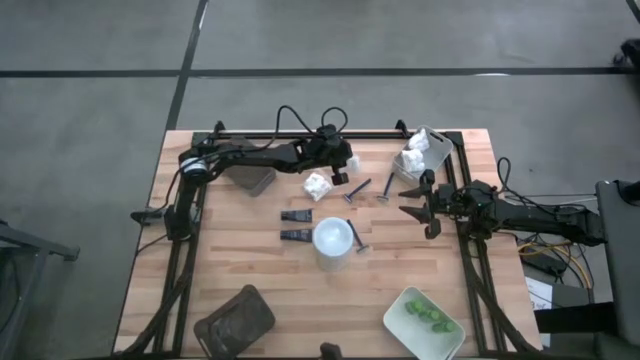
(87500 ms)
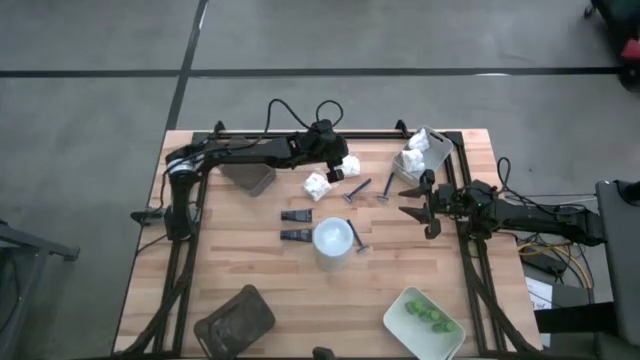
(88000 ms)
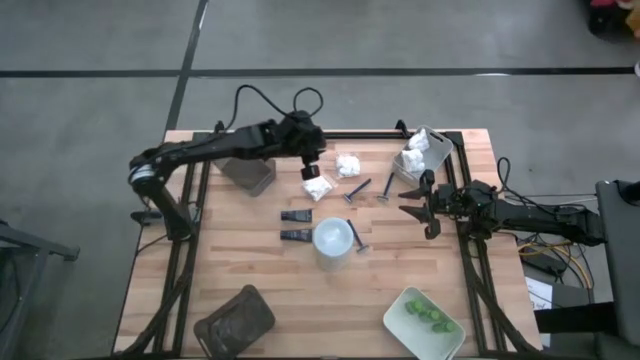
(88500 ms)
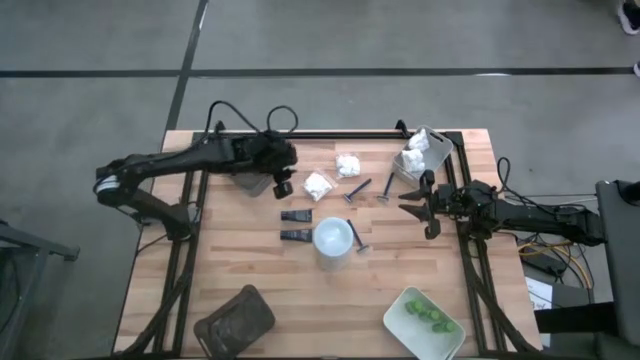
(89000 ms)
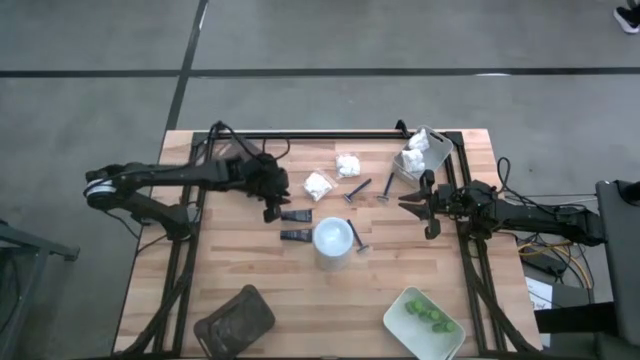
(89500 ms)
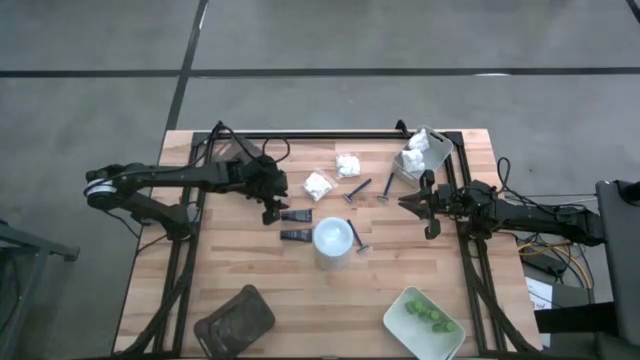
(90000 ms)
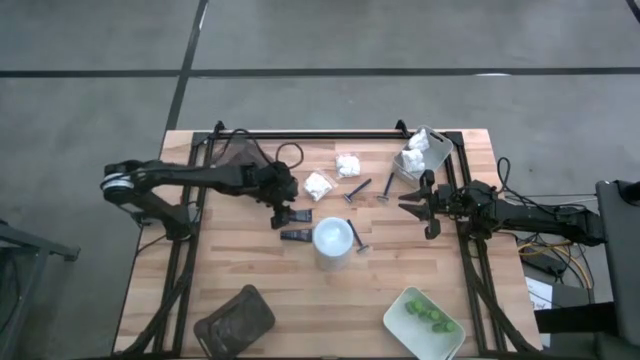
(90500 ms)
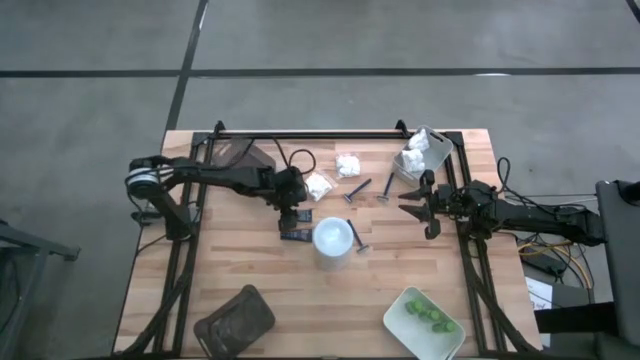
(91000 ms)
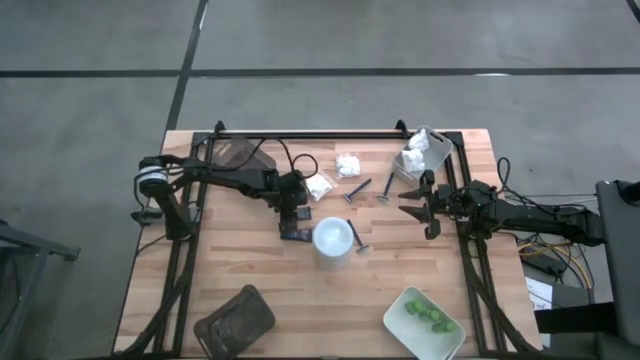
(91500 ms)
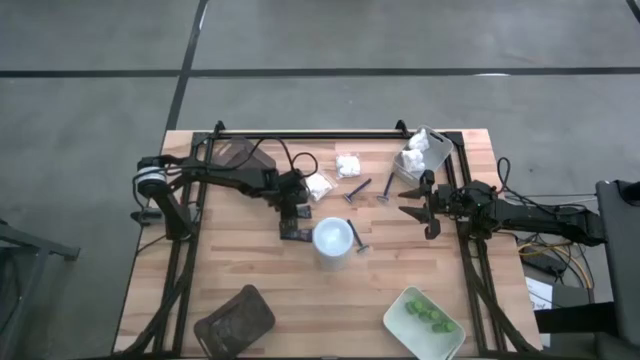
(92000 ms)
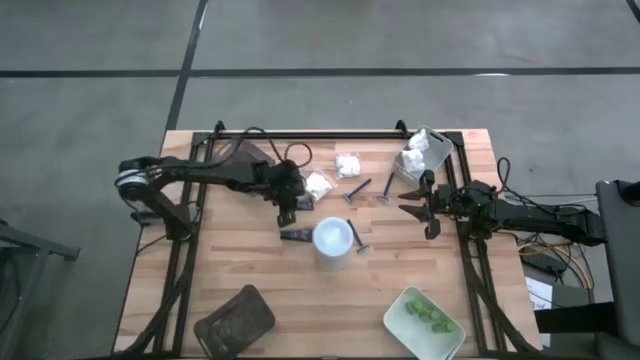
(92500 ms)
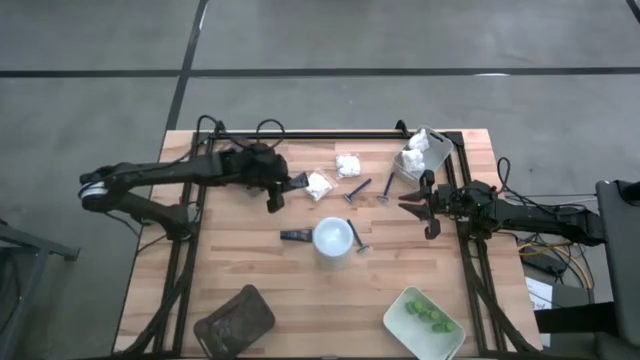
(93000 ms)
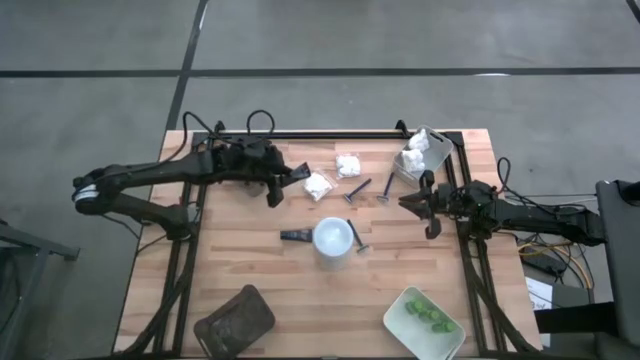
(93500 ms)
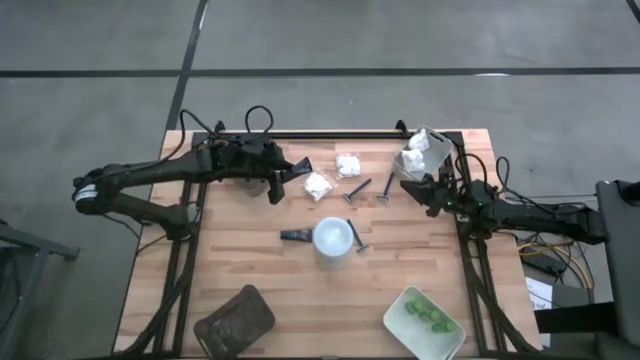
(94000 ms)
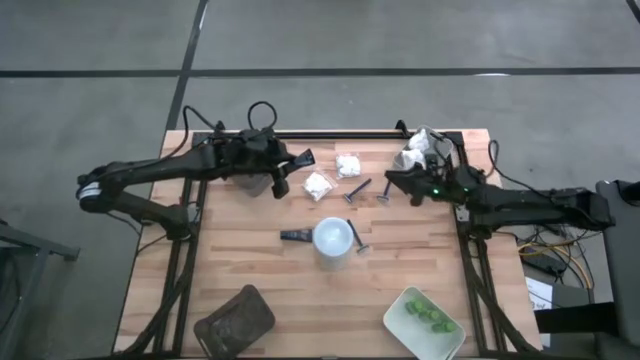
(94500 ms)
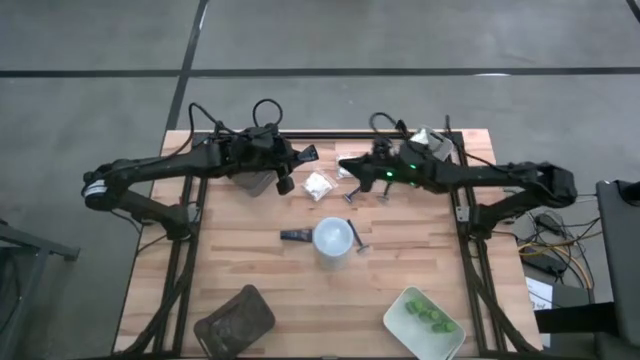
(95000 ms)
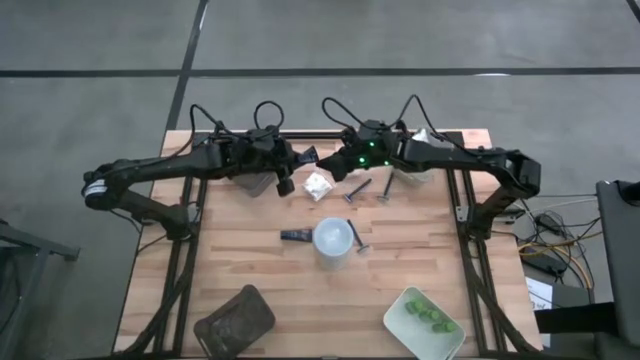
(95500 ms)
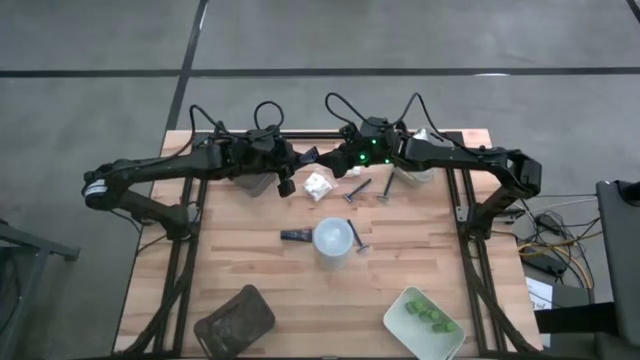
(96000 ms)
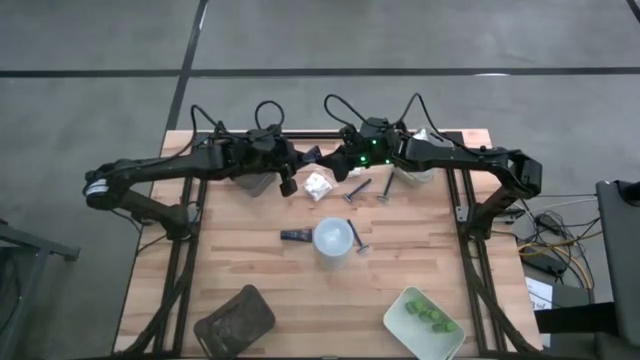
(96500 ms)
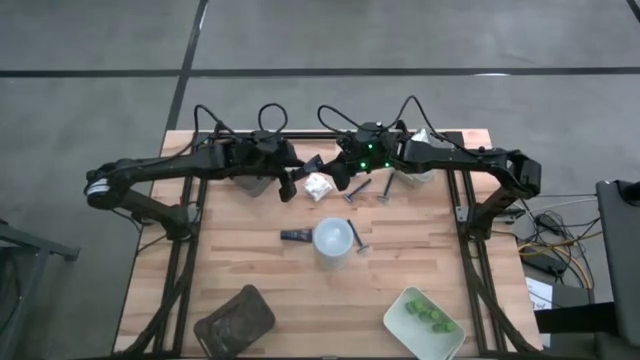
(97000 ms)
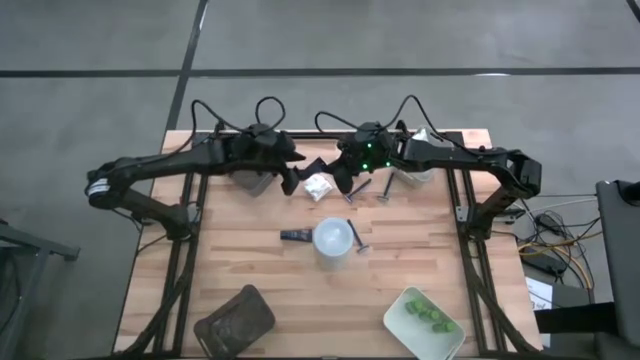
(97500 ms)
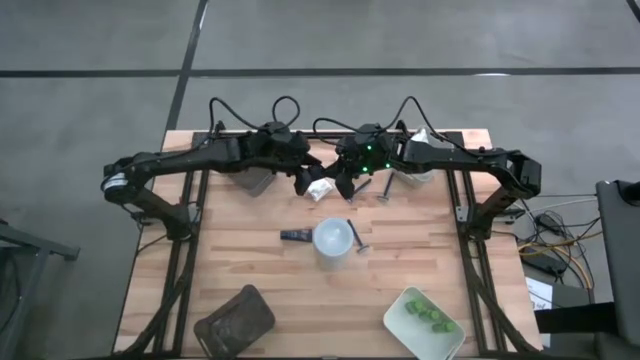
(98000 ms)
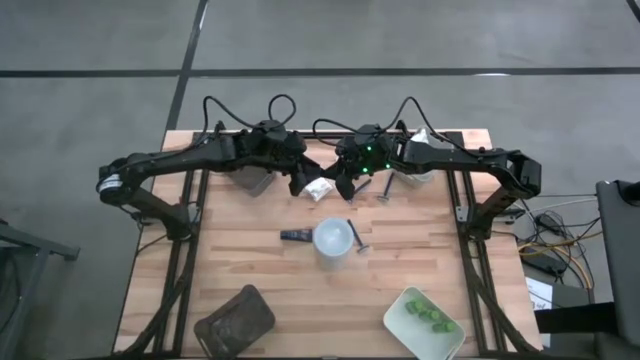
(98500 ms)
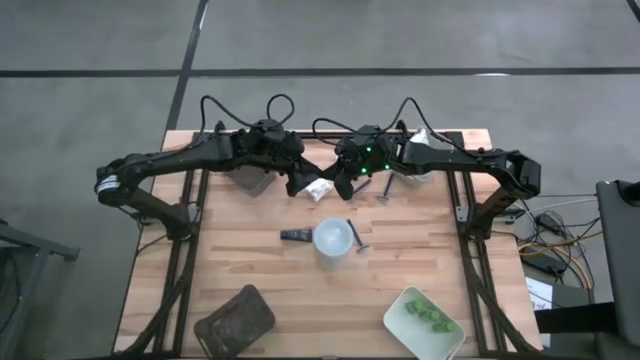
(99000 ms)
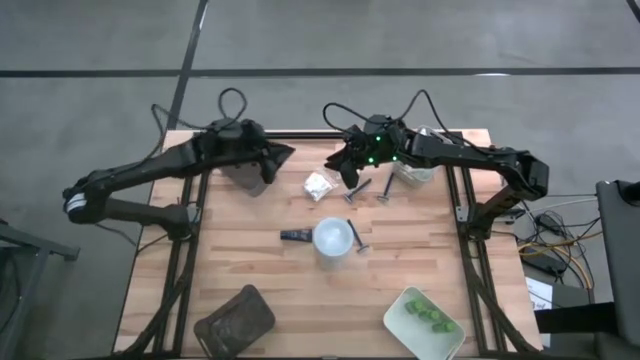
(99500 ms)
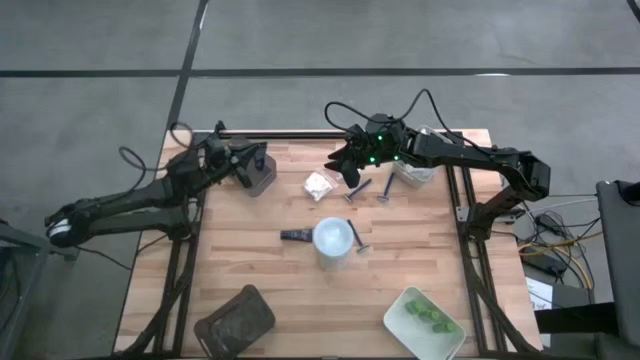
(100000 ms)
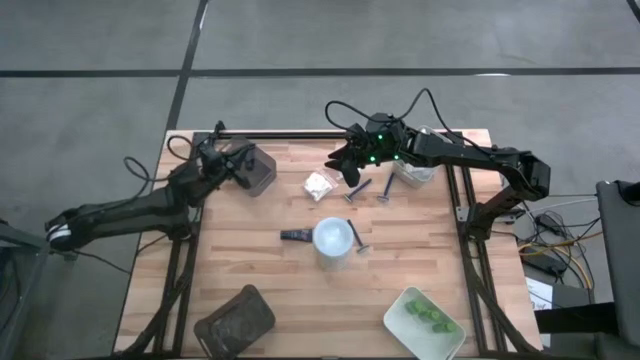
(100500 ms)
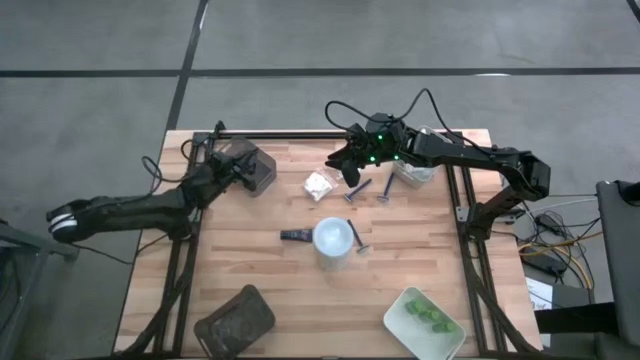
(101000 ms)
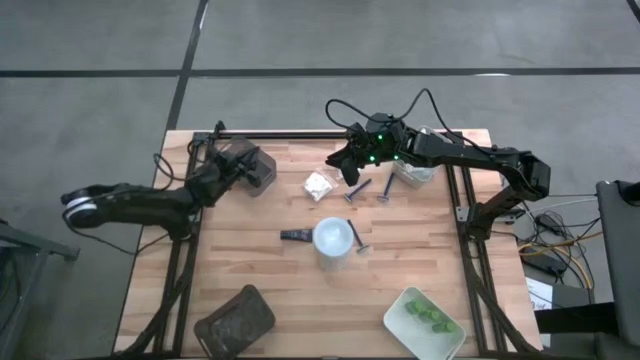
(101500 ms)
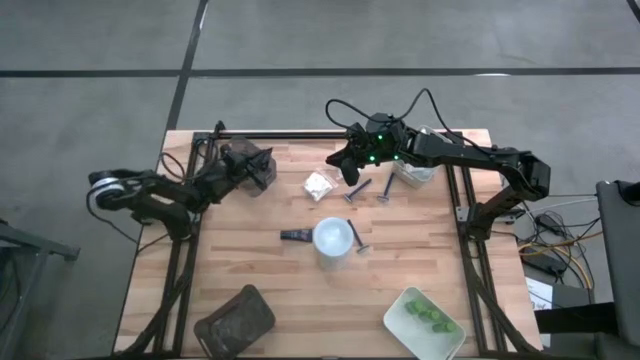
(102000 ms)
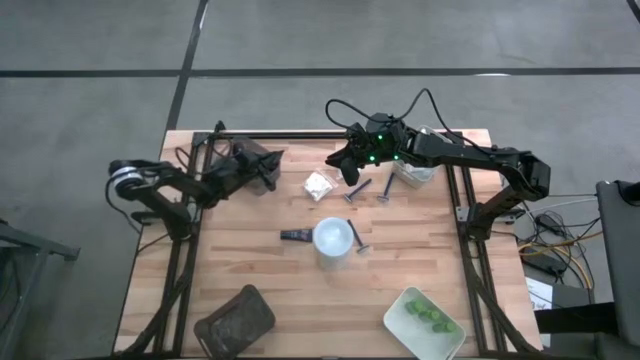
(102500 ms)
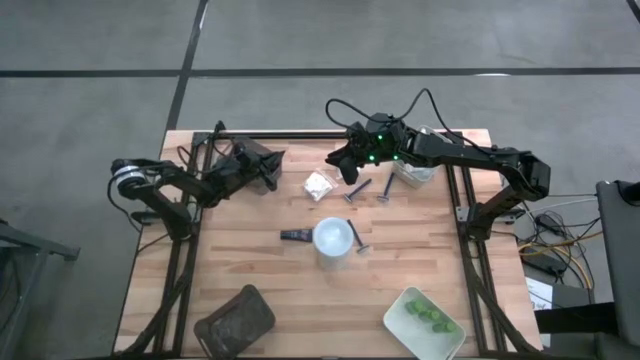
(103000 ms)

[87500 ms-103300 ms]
Task: Pick & Place Travel size toiletries
Put the blue shave cream into the top black bin

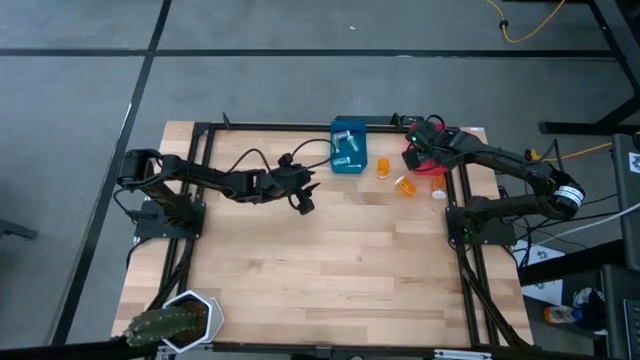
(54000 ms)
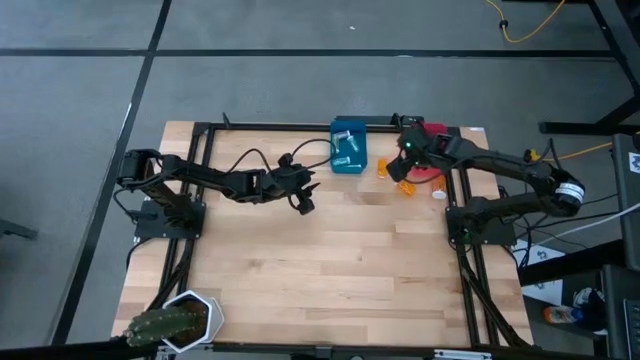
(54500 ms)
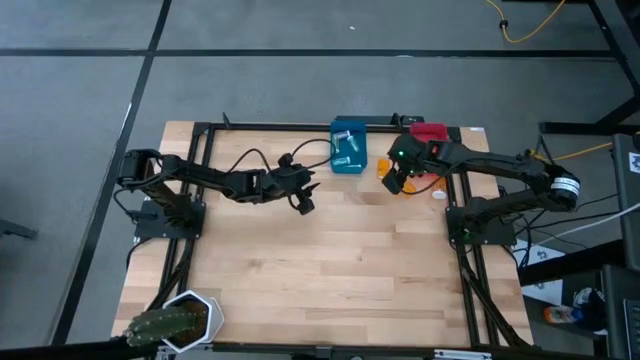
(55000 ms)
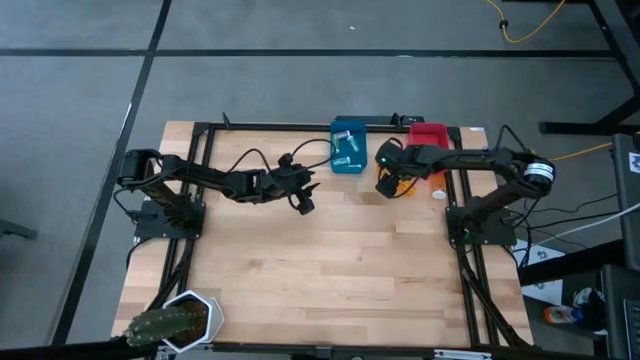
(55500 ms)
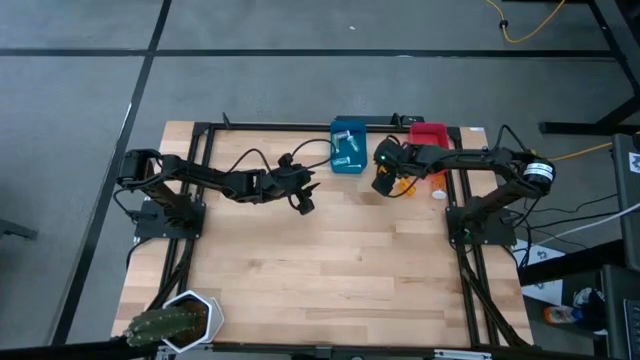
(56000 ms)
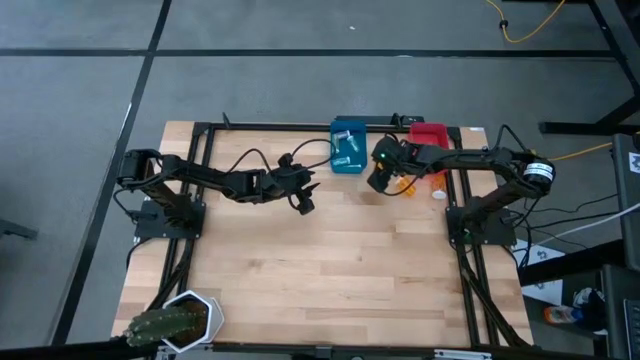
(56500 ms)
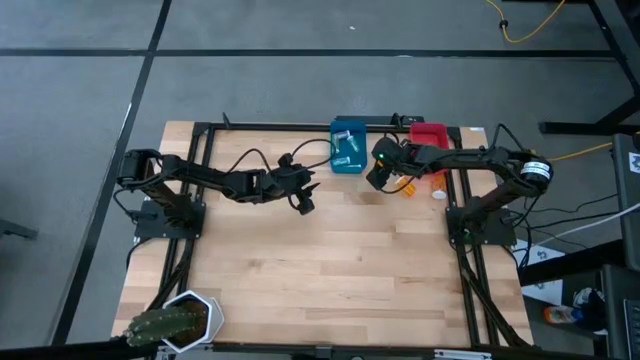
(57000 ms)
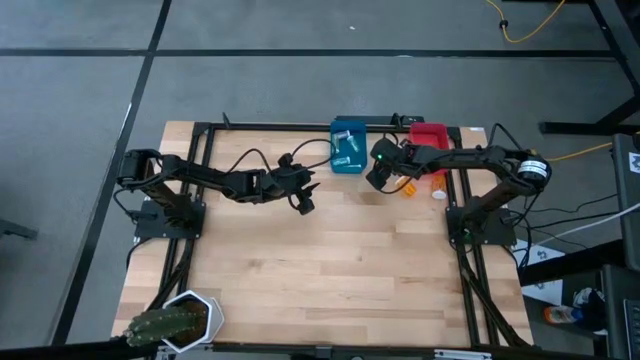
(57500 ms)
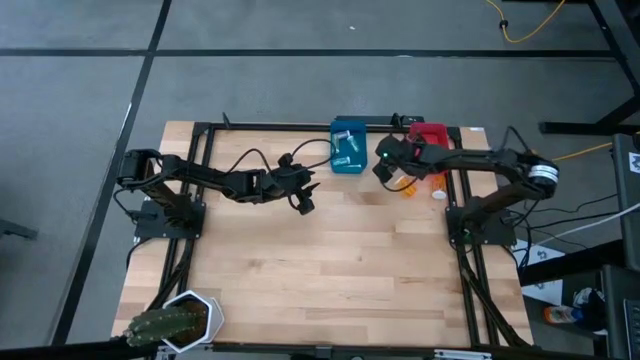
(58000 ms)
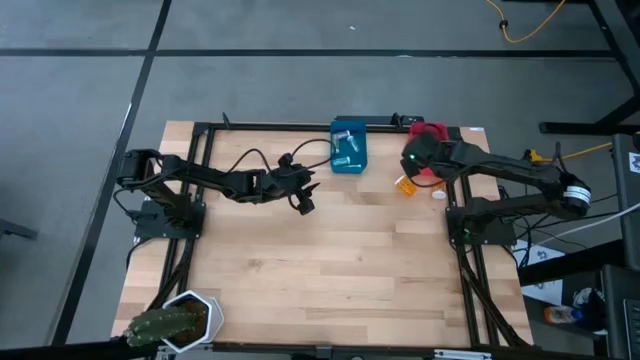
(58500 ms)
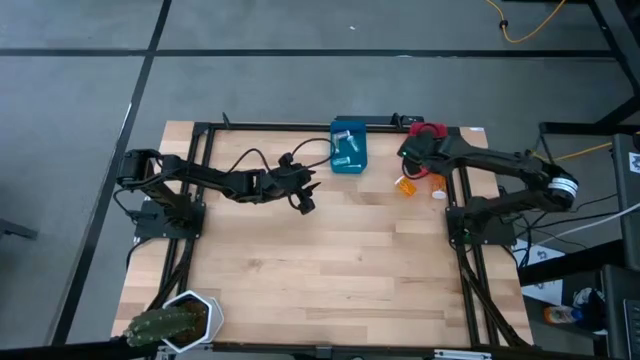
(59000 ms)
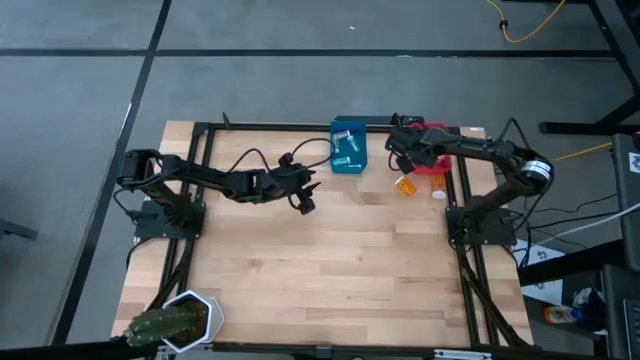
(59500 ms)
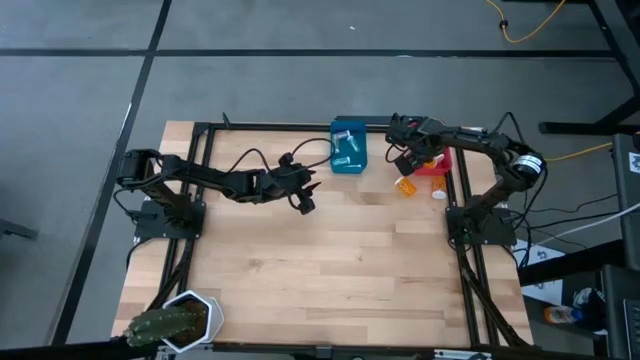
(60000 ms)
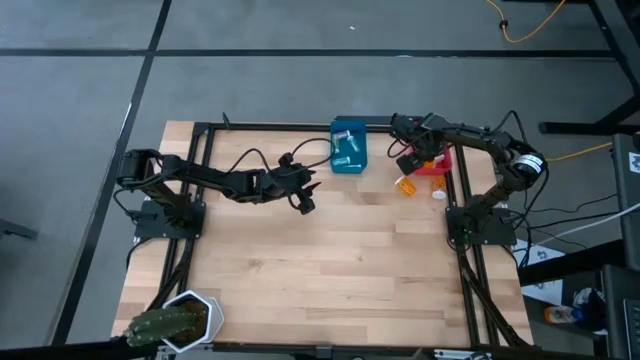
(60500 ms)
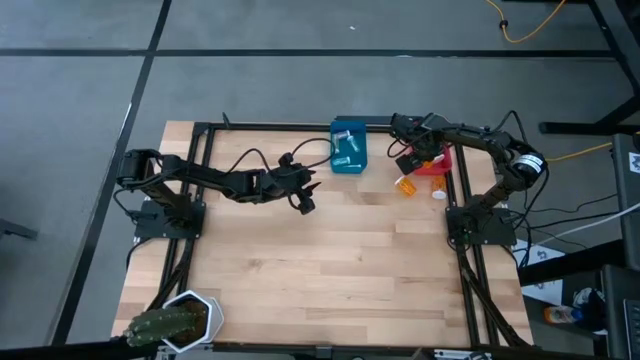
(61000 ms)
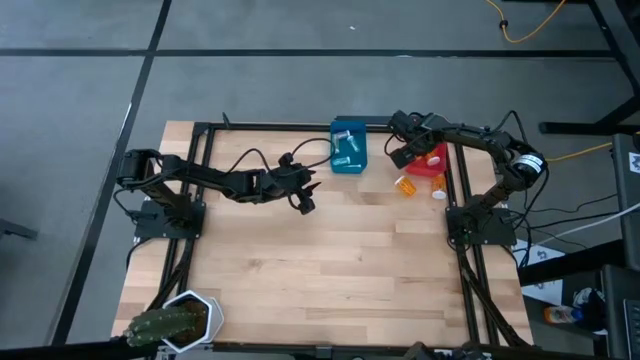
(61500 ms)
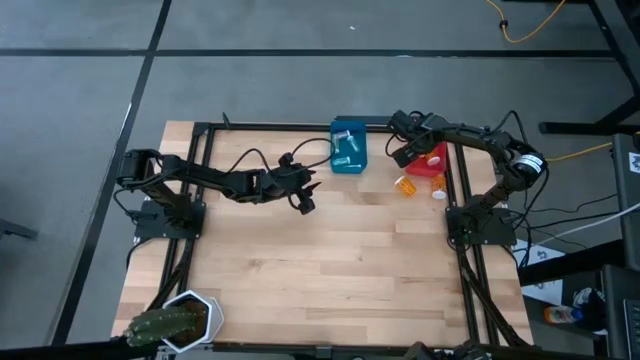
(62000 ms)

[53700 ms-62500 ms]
Task: Pick and place medicine bottles into bin by pill shape (circle, oval)
Put the big orange pill bottle into the pink bin
